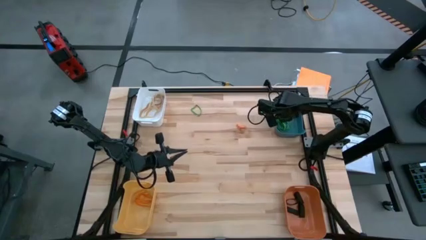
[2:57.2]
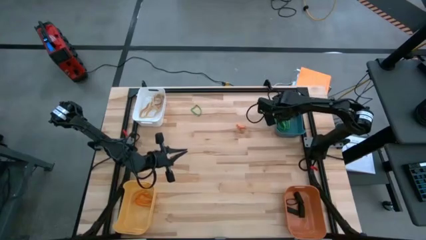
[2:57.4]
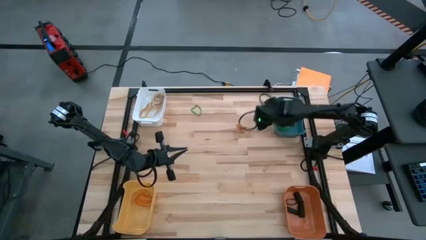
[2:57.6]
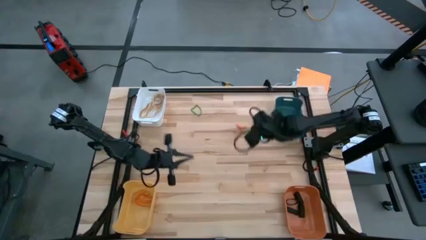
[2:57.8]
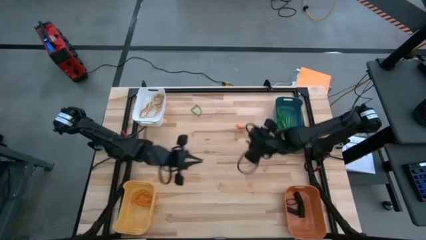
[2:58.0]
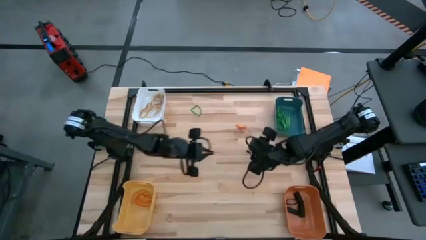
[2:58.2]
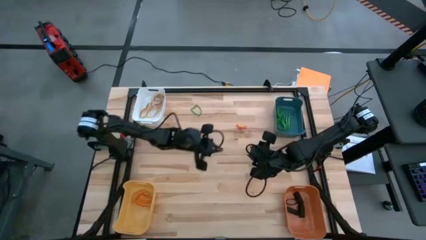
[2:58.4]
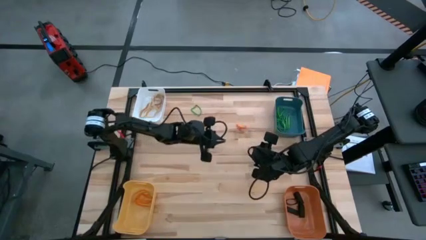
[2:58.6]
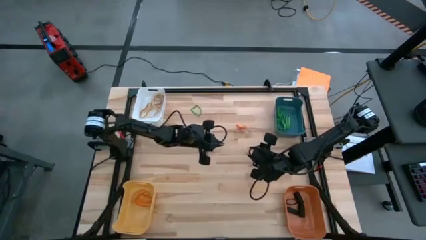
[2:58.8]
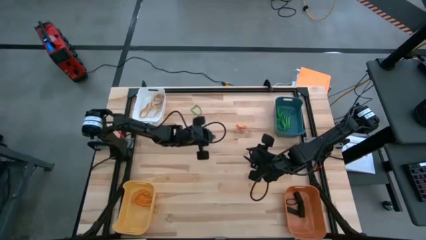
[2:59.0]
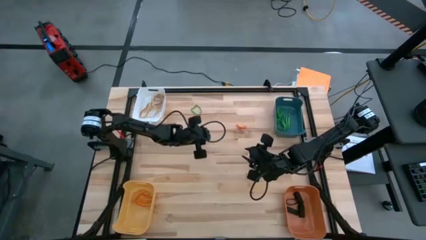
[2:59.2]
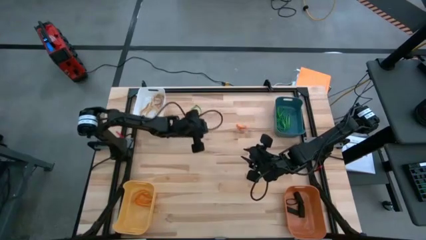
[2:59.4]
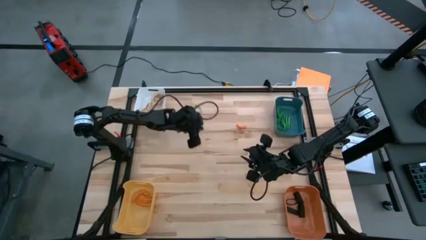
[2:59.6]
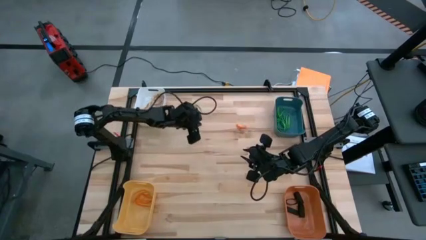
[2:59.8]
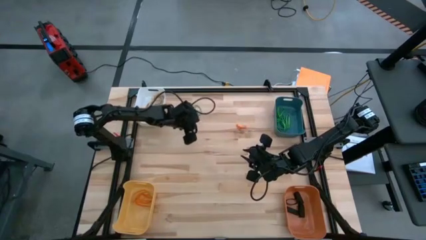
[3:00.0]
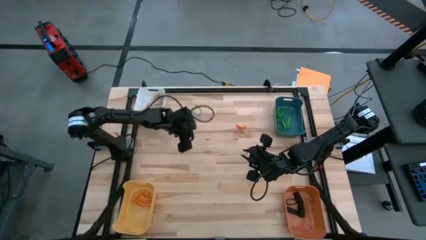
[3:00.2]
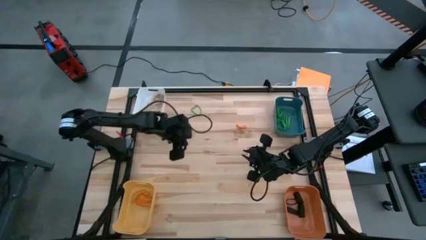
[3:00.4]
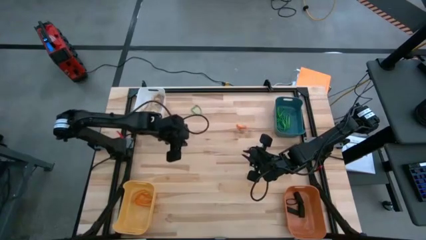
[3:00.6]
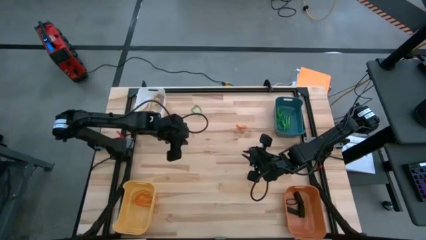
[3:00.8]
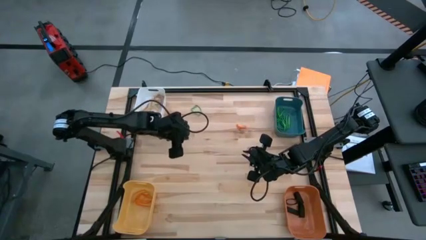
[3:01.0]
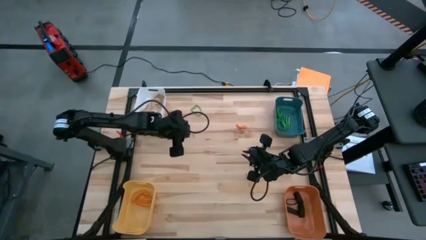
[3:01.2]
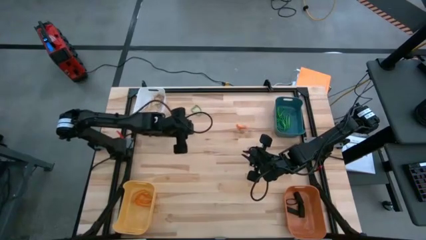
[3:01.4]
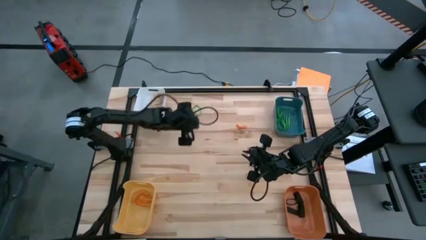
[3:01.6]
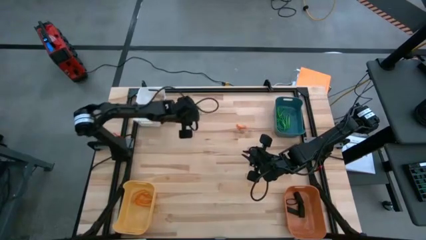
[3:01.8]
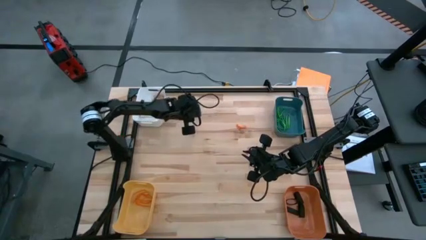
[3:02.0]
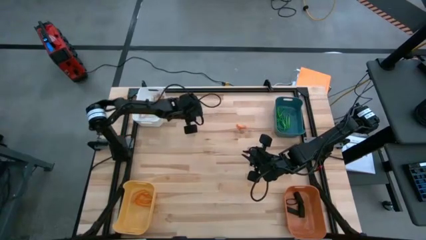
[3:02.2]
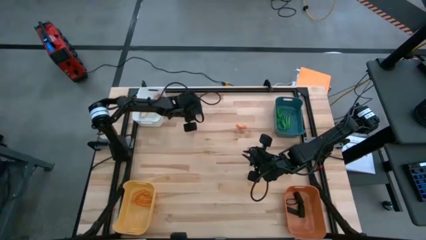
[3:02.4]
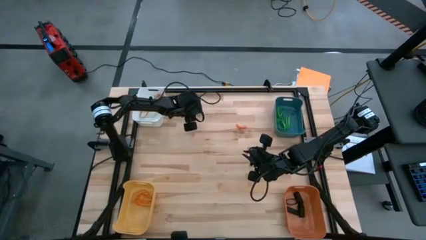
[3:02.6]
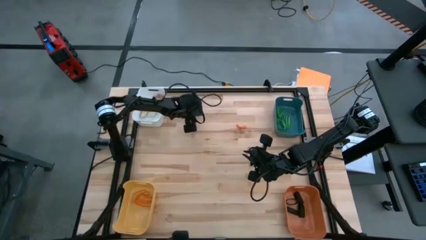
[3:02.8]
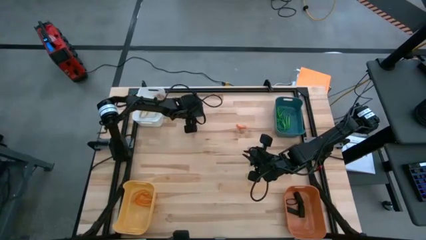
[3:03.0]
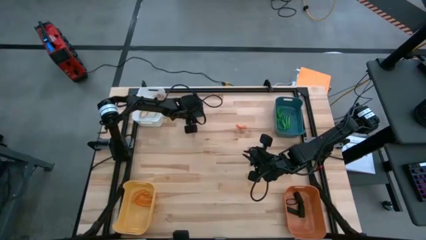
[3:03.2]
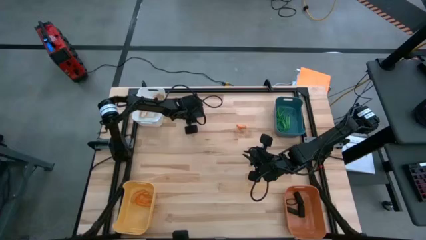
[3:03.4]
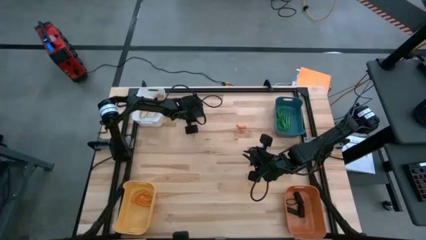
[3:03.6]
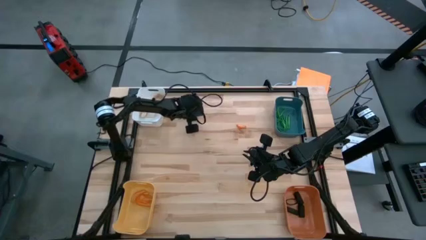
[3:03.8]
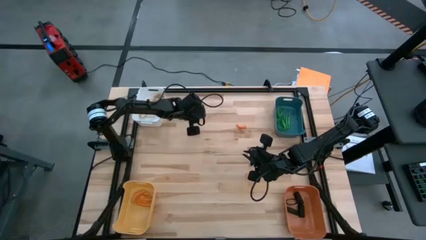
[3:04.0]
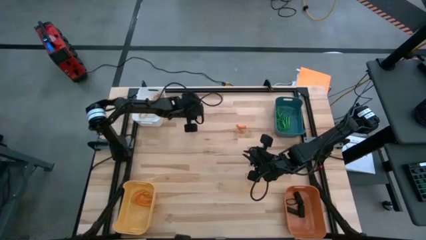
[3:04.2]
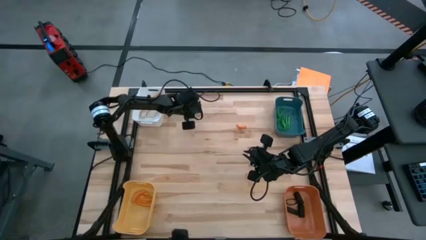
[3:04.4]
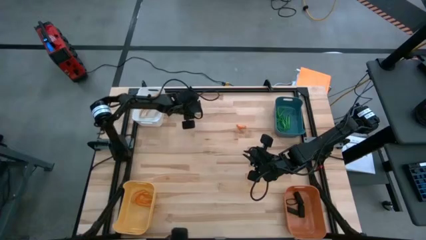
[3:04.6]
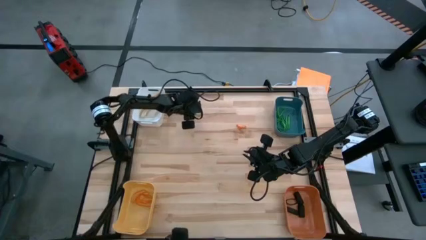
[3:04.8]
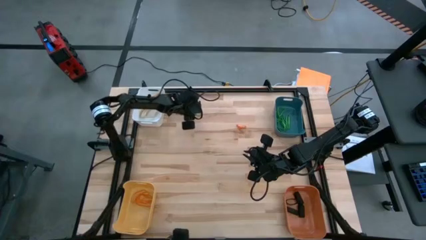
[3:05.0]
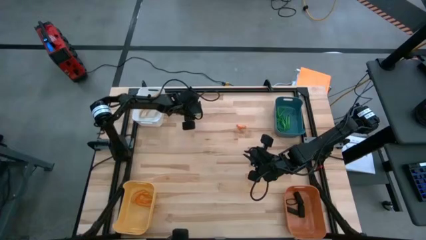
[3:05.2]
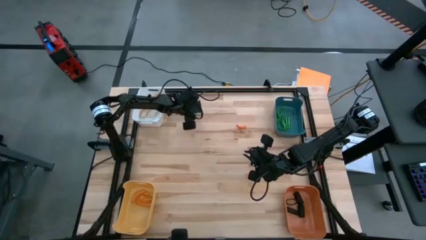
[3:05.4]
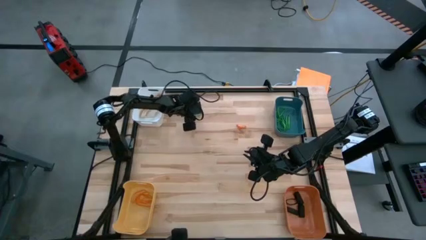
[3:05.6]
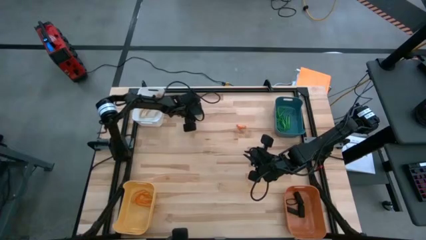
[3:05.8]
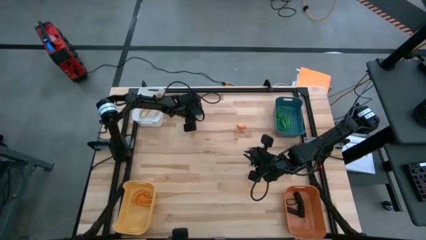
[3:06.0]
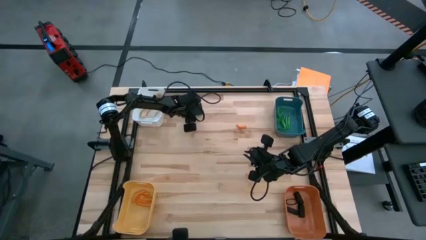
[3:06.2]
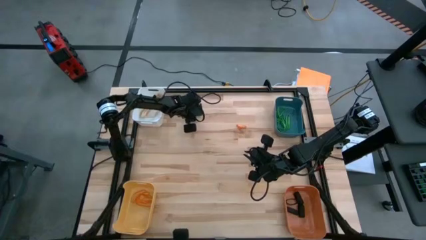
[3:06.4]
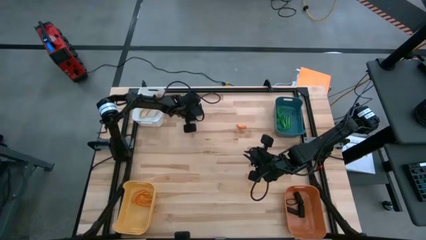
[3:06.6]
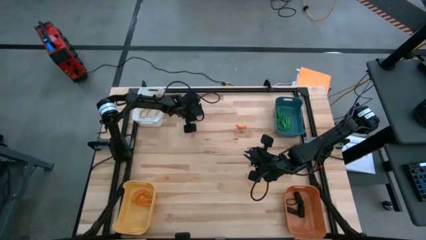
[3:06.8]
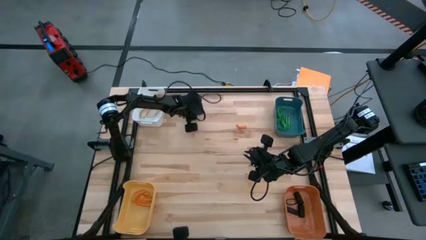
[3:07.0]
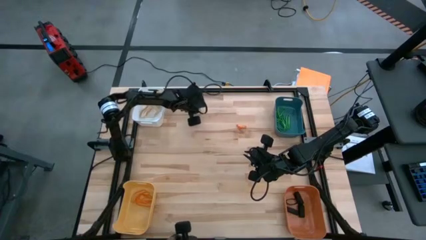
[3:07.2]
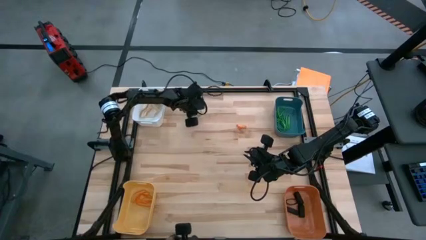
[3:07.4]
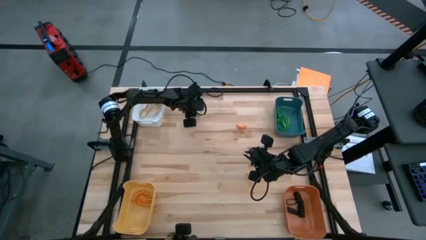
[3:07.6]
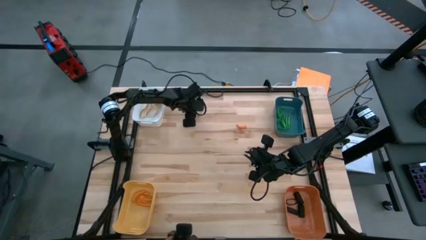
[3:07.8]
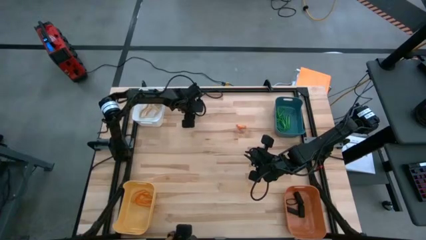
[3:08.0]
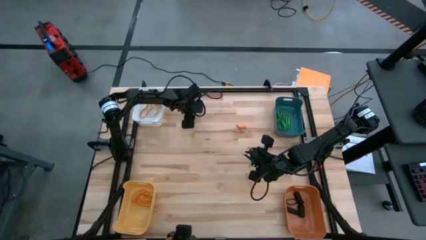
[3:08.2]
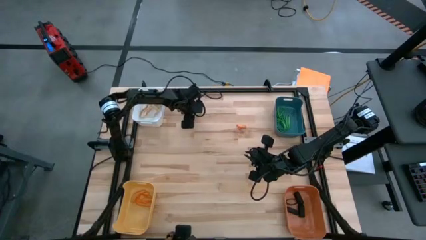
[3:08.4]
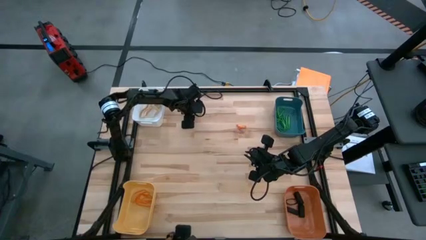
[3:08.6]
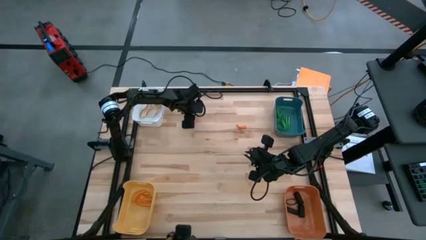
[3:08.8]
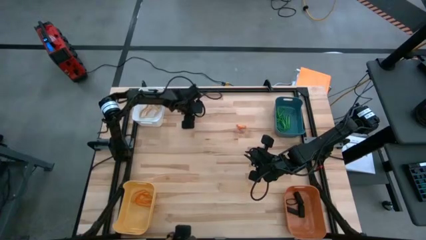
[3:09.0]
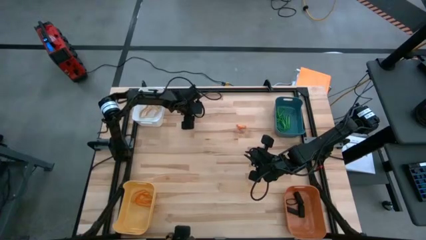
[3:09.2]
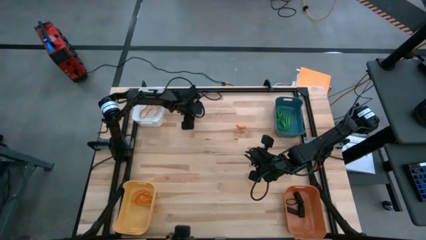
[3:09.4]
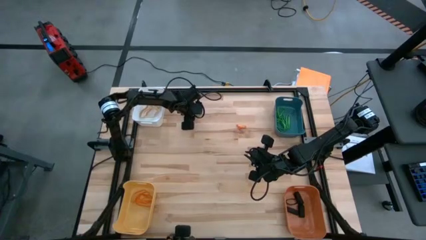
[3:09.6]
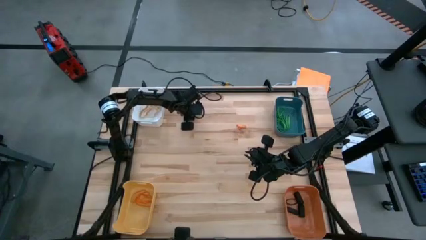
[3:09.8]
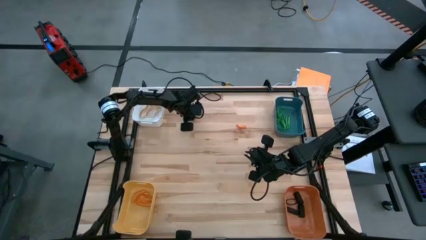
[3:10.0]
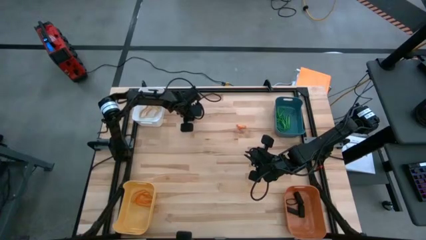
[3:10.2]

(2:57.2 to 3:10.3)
Task: Sort rubber bands into baskets
Put the green rubber band into the blue bin

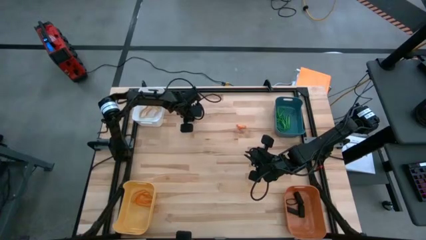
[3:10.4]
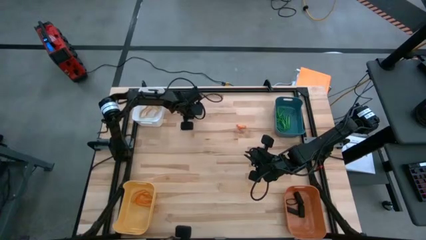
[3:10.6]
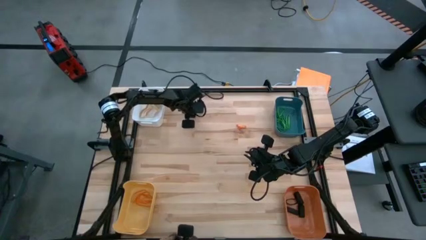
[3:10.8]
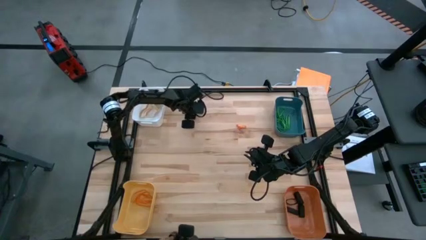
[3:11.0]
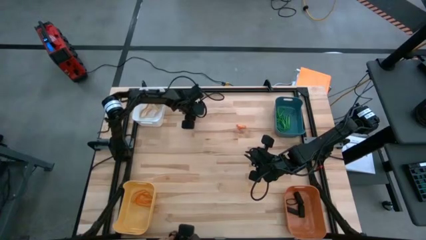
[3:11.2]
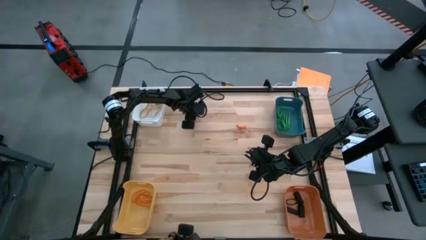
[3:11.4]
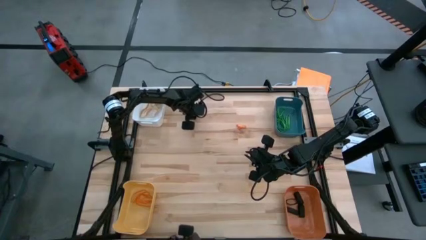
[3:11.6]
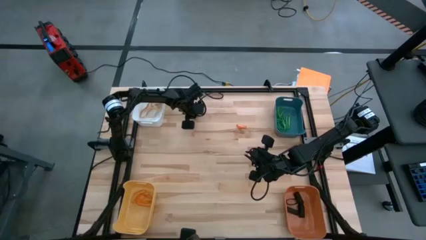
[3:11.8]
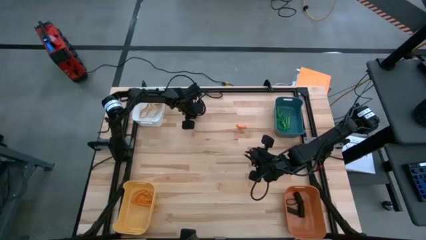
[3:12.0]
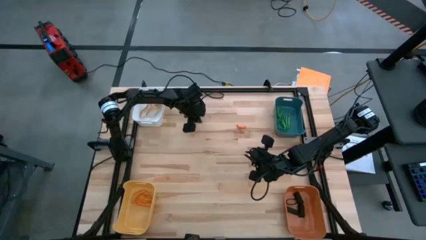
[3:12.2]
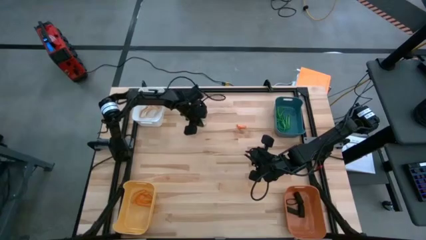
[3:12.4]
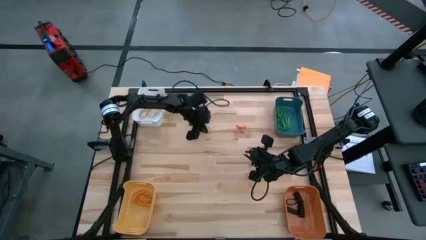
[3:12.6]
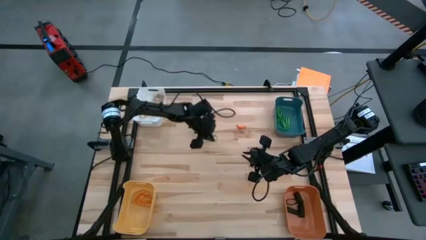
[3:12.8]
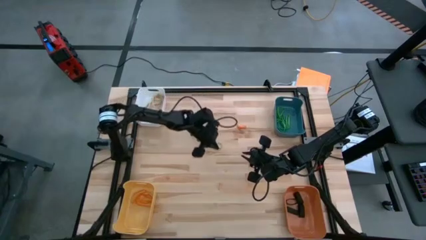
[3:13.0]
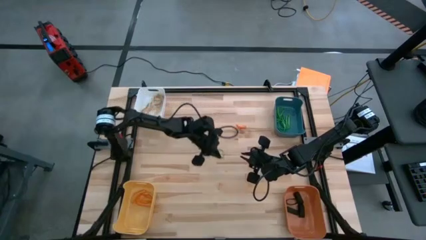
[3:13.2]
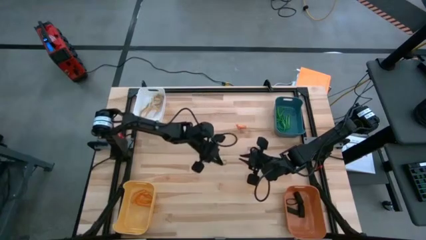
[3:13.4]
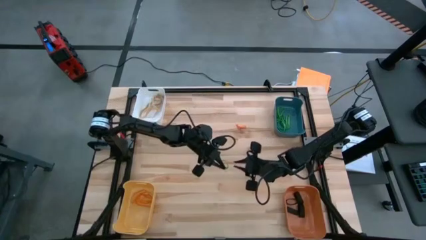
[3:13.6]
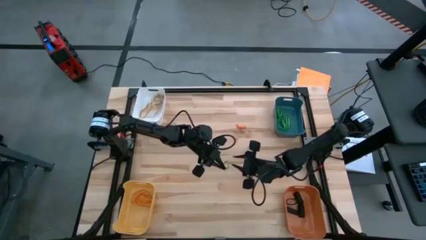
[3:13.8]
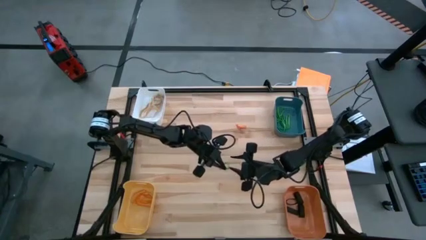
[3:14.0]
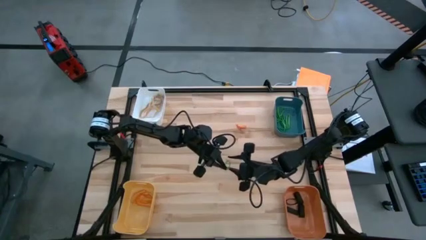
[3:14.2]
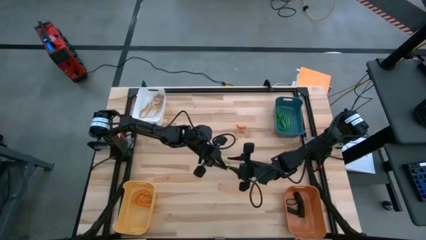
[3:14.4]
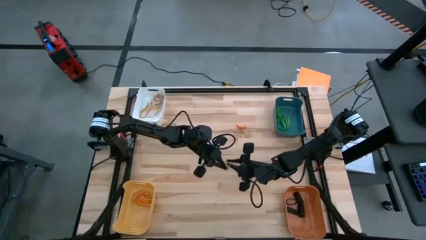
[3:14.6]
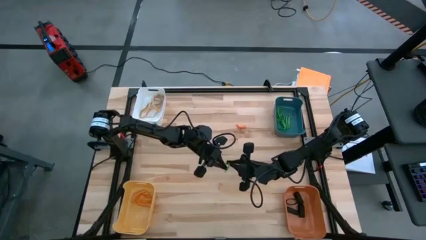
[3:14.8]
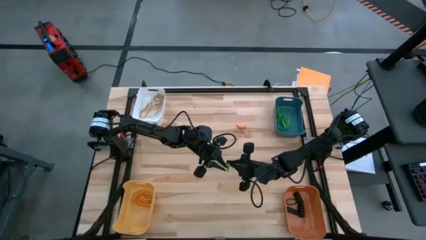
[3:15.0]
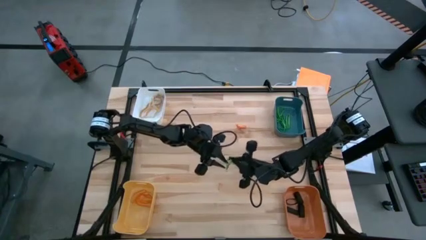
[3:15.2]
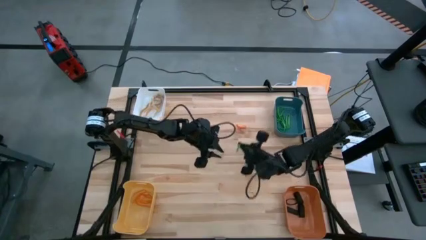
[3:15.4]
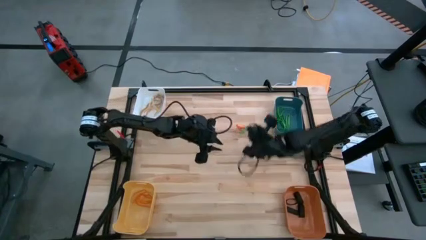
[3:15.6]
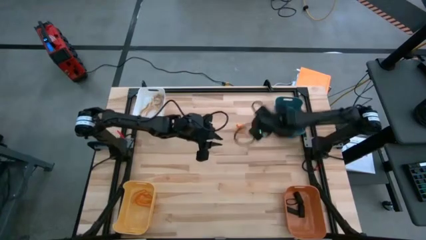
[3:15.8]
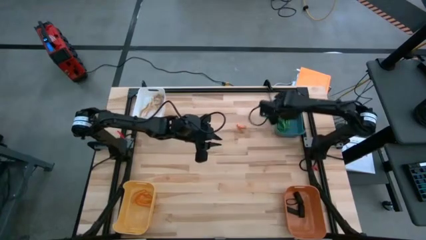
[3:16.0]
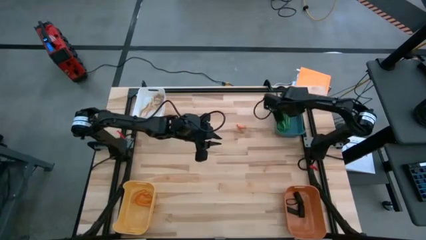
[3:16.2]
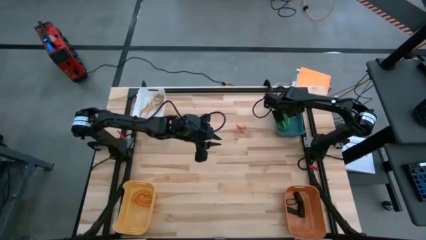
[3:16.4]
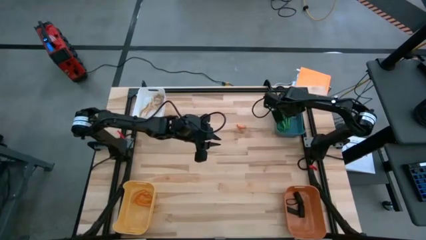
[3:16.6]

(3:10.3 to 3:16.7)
Put the green rubber band into the blue bin
